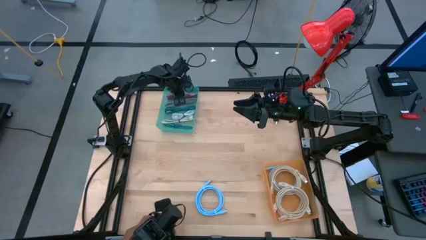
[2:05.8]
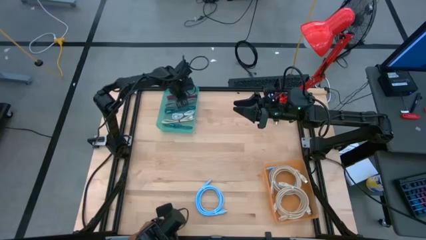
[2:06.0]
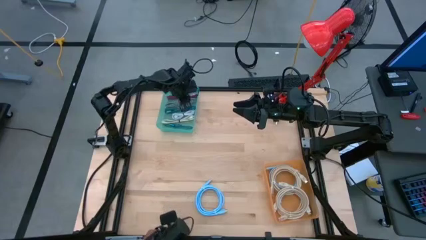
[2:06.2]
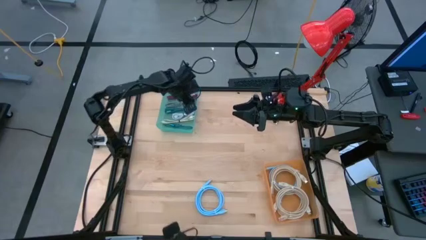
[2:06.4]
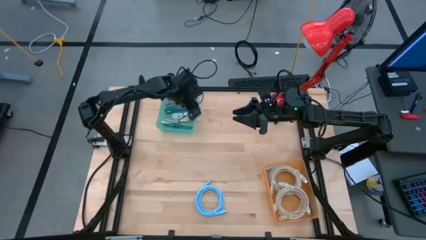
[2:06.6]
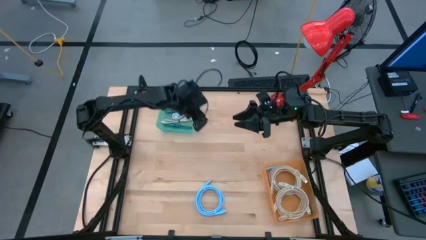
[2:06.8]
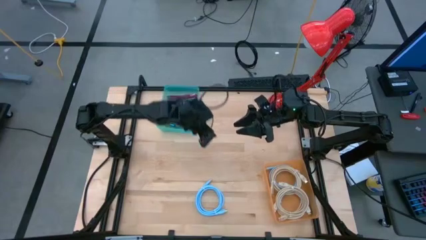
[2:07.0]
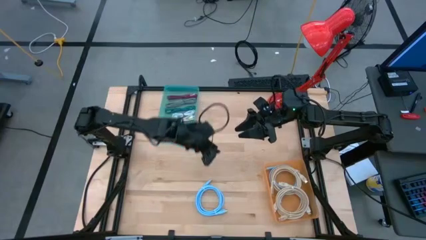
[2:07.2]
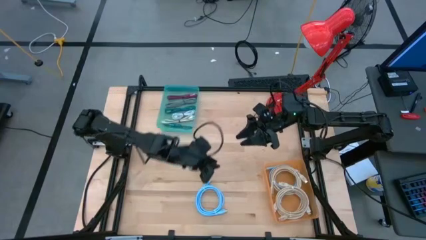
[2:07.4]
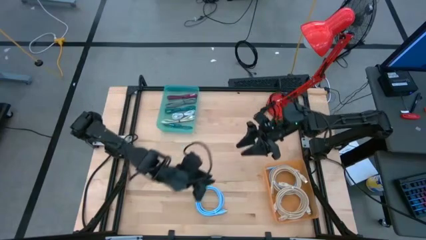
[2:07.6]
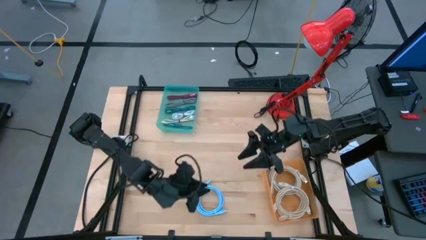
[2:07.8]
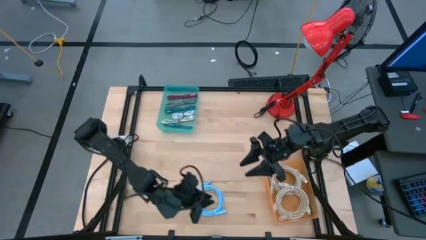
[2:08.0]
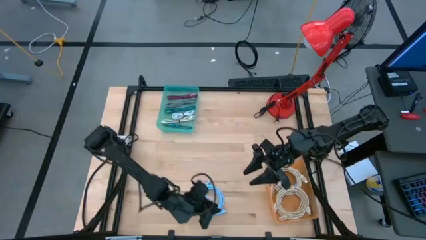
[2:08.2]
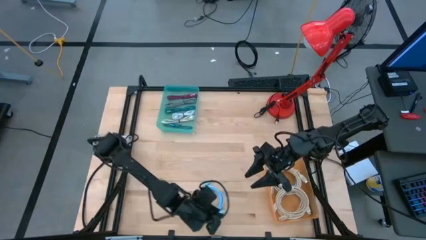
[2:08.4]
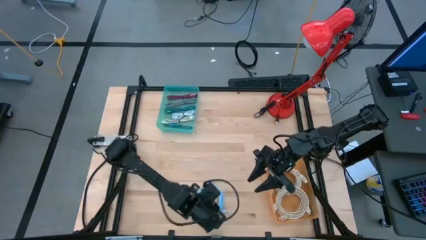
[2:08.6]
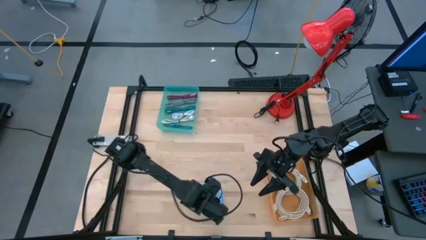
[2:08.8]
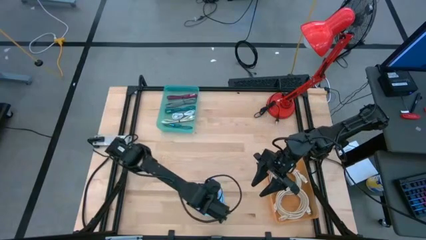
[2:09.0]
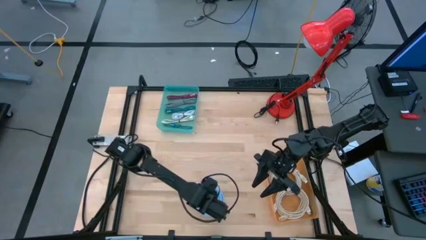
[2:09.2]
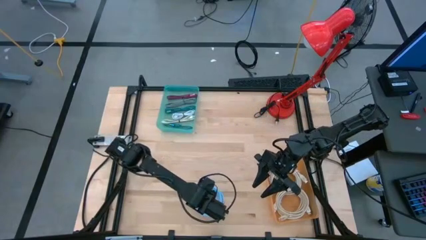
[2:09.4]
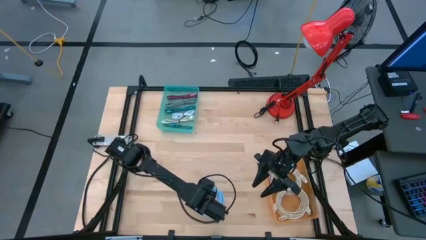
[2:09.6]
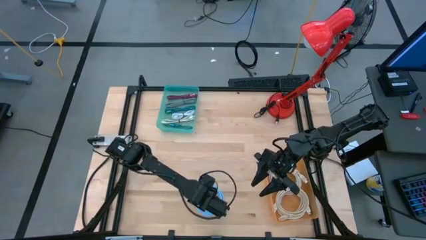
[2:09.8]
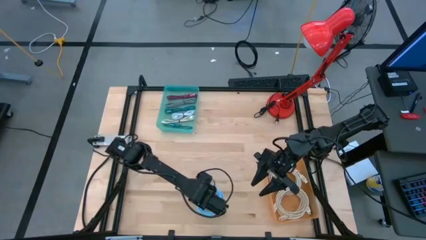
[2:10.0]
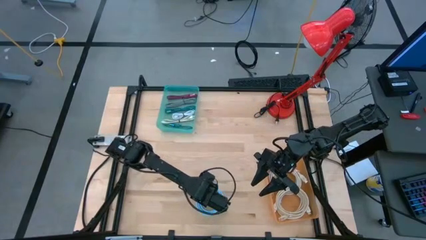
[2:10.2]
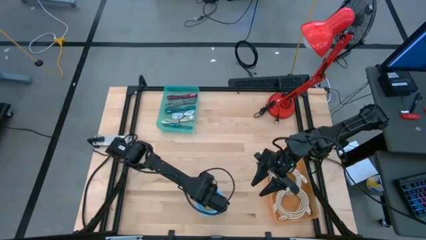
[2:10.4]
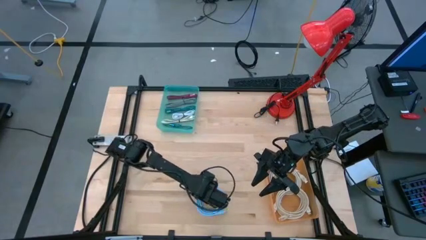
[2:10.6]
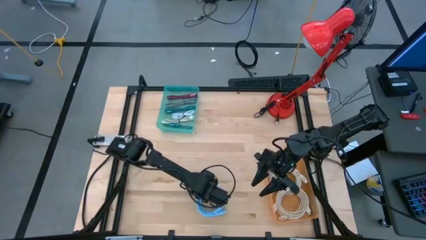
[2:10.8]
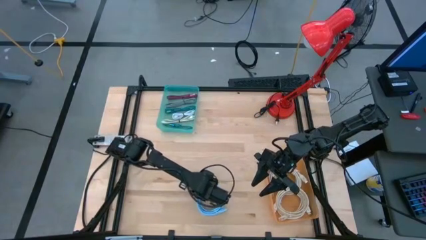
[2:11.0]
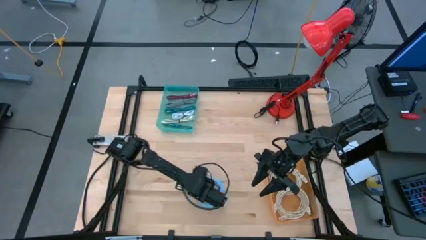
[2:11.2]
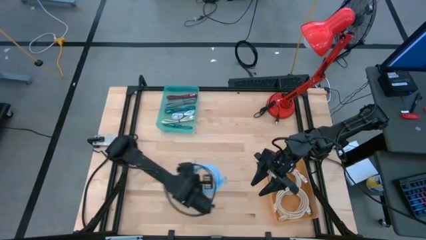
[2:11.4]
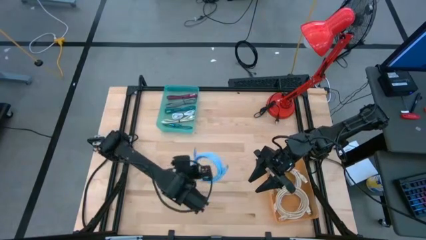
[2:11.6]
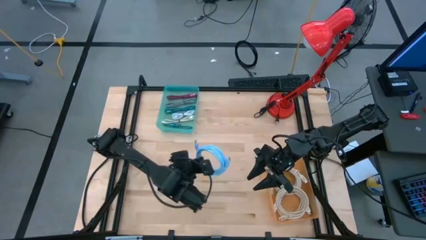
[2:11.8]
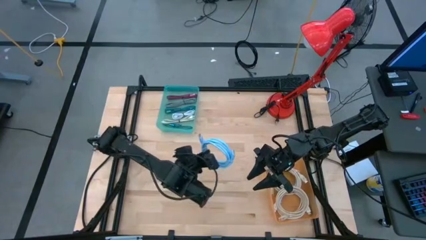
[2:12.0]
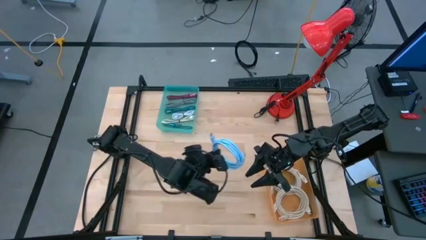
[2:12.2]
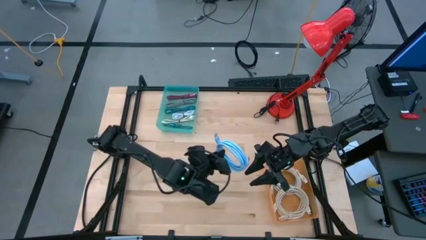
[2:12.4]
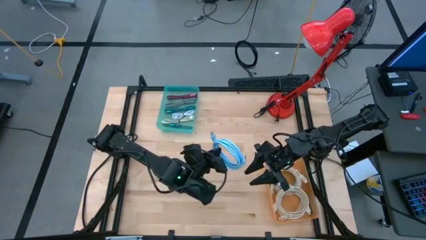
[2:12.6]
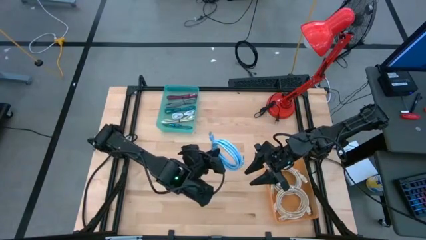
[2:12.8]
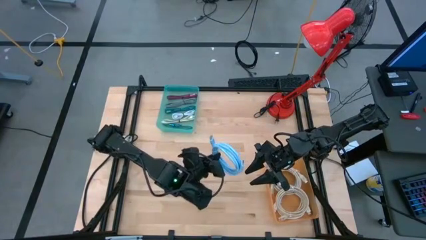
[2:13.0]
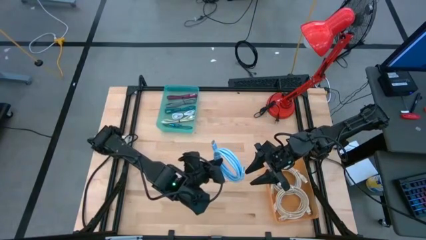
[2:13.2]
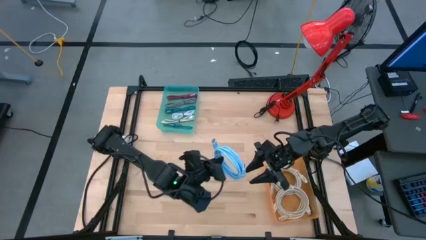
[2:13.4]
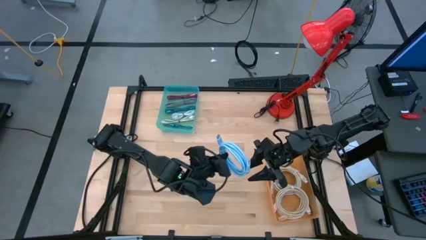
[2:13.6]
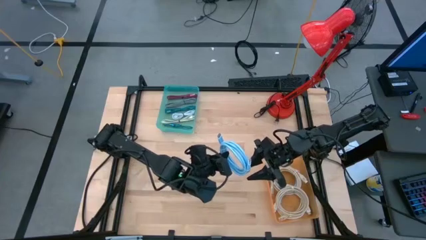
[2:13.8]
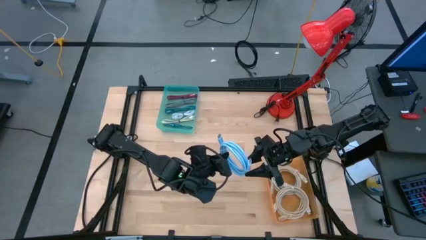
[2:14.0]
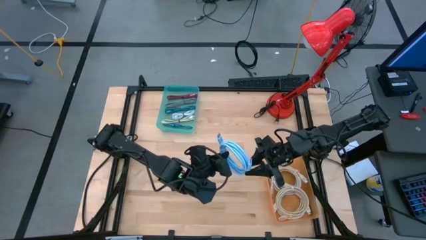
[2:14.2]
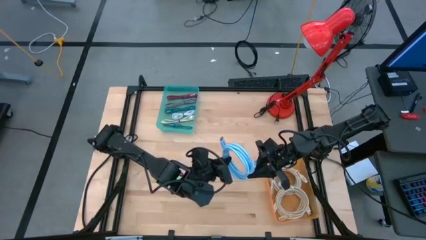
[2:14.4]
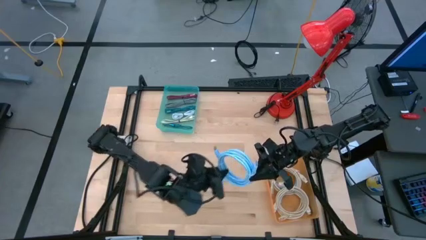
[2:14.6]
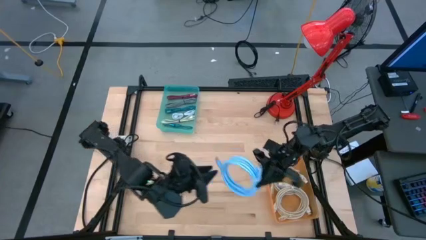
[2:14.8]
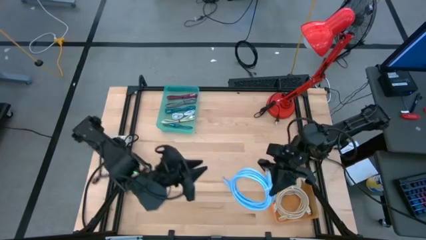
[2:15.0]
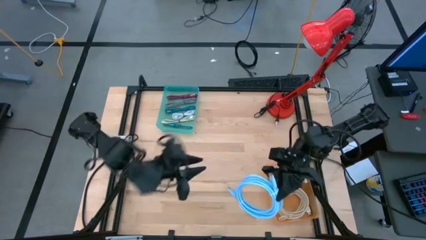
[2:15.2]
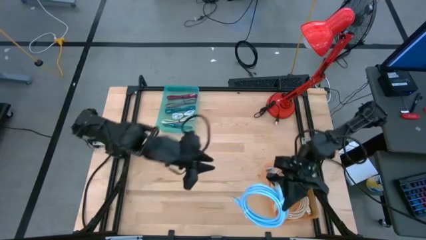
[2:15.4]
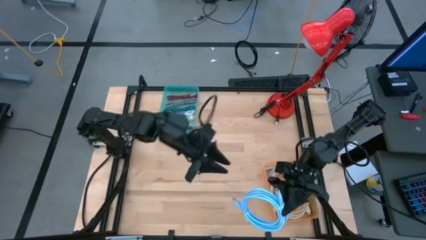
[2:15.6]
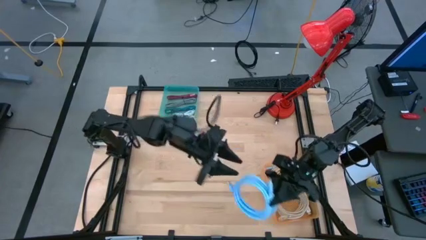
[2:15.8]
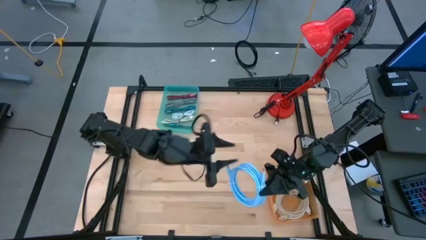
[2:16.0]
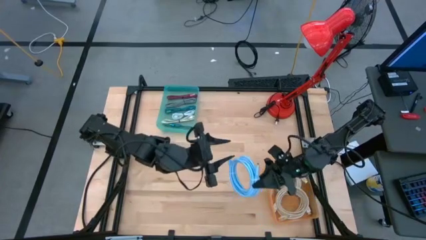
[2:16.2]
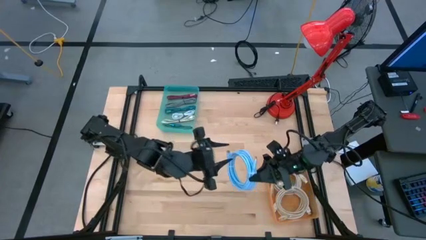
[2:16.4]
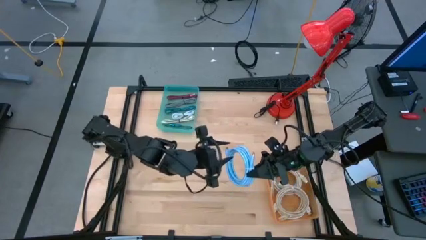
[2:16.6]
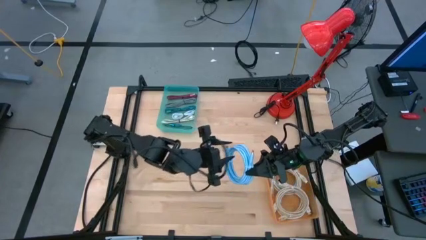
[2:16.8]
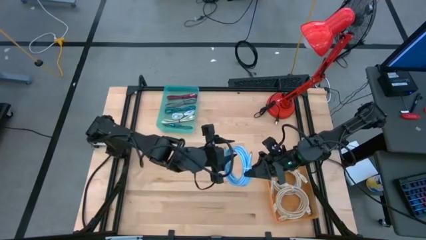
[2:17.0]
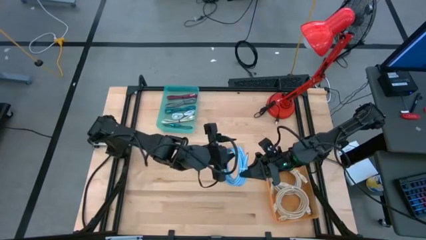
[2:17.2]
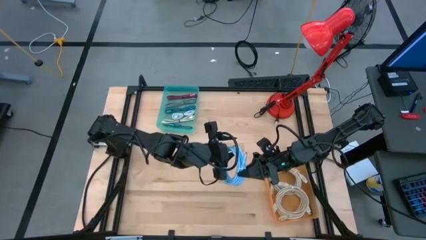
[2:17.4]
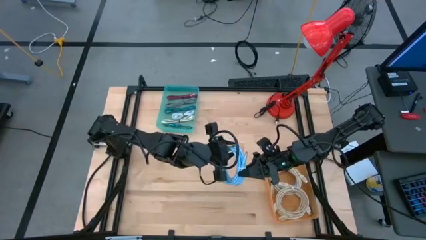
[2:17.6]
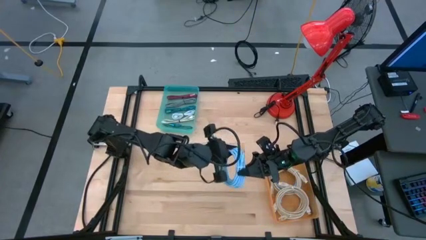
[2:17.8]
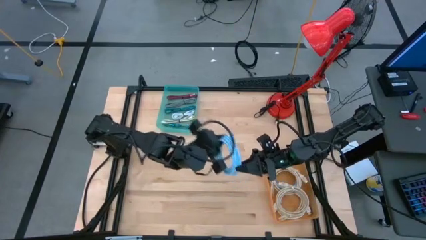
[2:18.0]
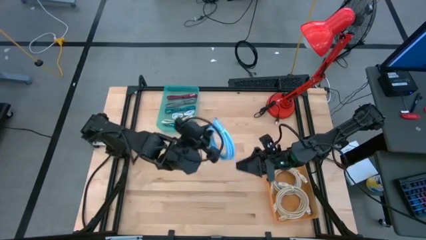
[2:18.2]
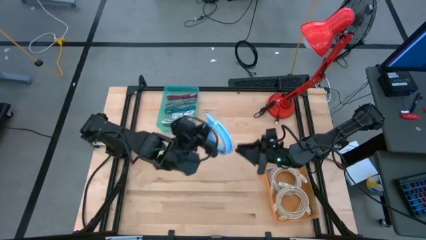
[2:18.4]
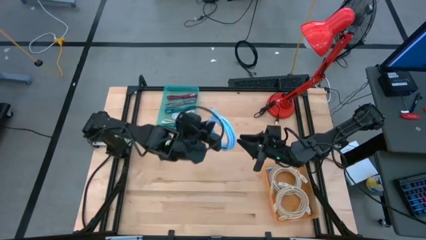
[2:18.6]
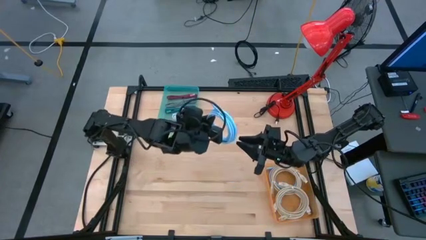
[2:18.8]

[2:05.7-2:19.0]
Task: Pick & Place USB Port
Put the blue HDMI cable into the orange bin

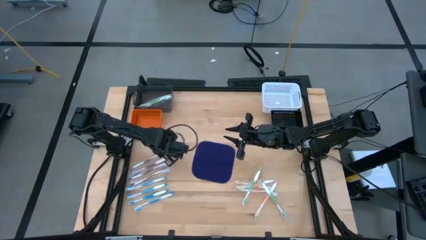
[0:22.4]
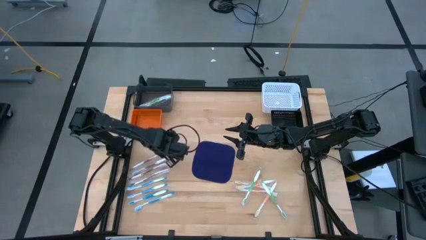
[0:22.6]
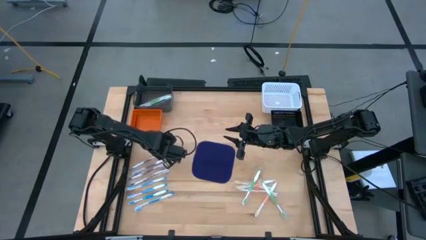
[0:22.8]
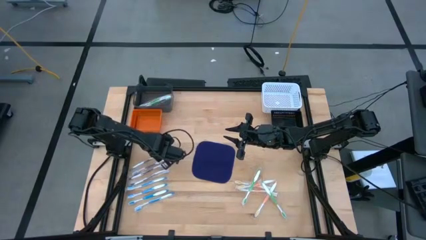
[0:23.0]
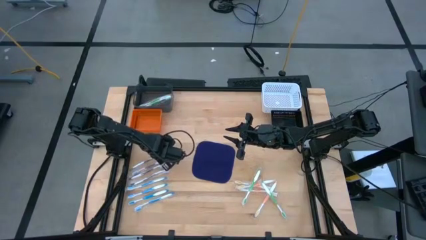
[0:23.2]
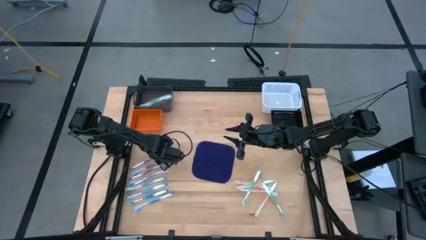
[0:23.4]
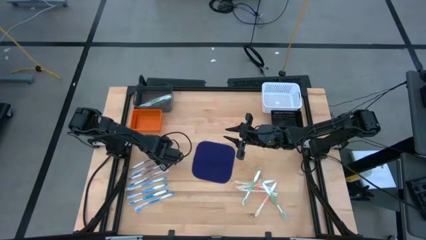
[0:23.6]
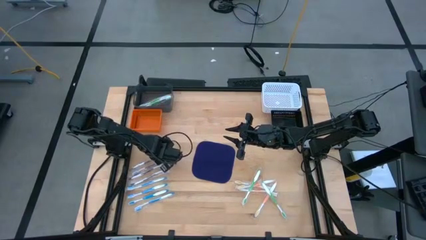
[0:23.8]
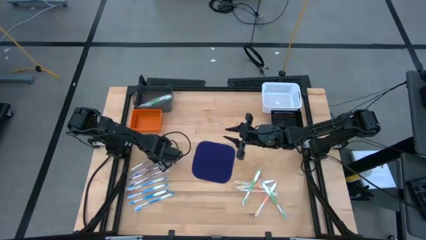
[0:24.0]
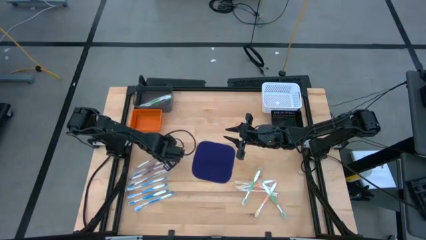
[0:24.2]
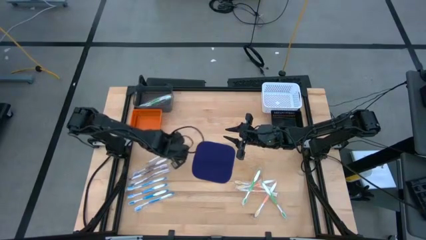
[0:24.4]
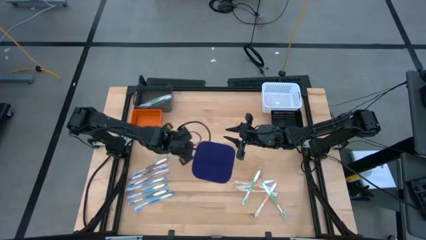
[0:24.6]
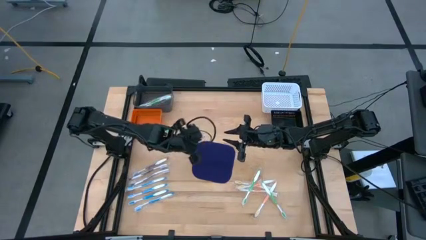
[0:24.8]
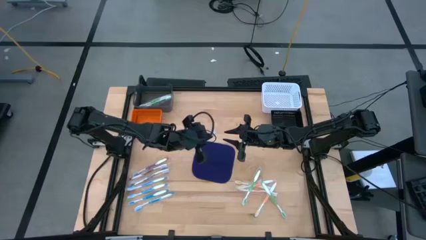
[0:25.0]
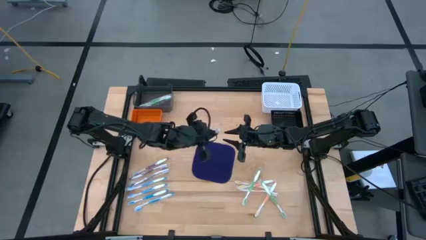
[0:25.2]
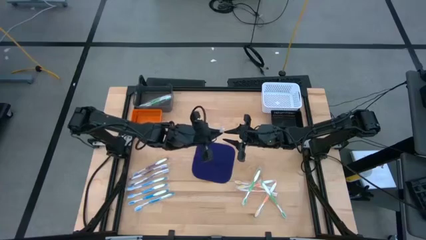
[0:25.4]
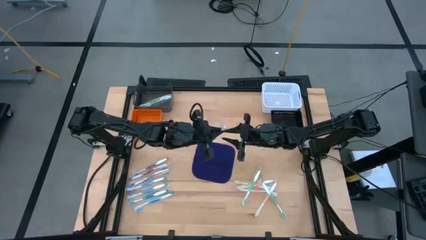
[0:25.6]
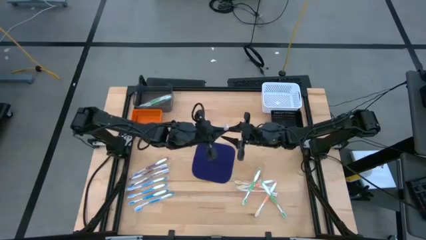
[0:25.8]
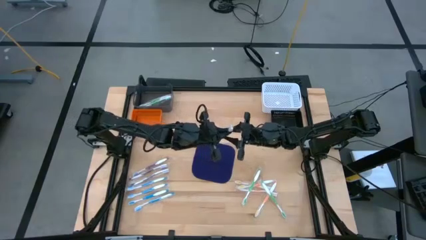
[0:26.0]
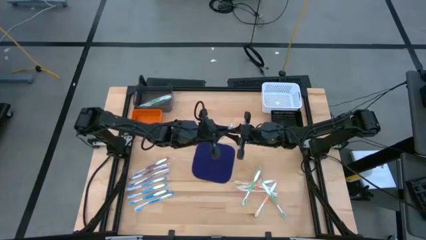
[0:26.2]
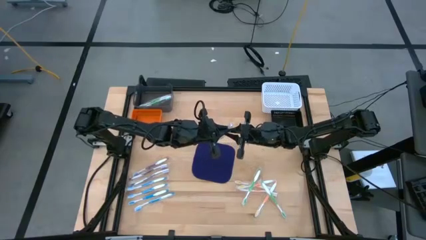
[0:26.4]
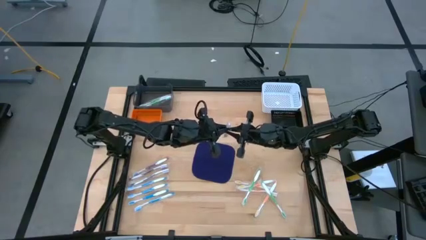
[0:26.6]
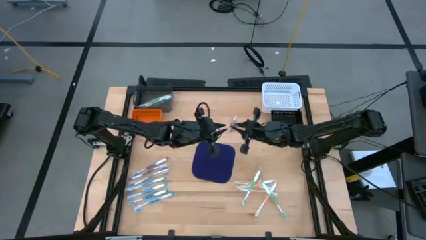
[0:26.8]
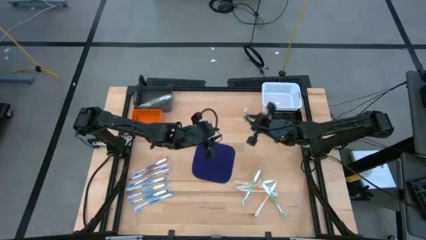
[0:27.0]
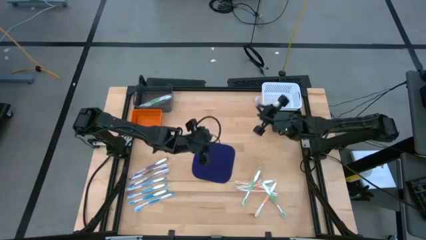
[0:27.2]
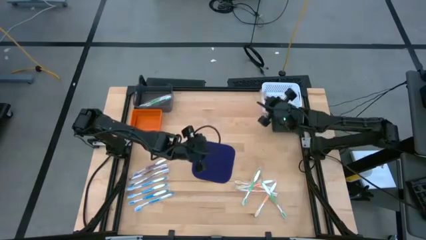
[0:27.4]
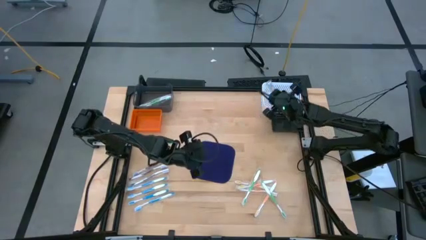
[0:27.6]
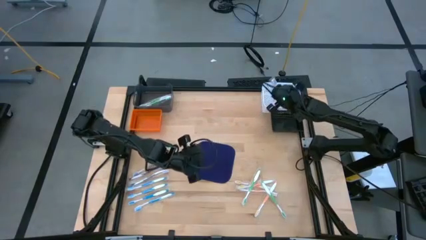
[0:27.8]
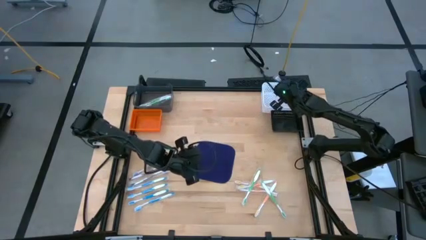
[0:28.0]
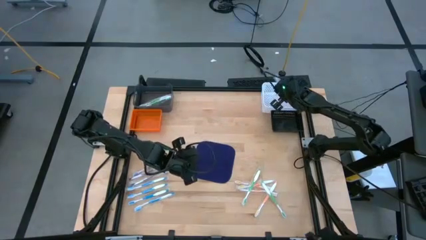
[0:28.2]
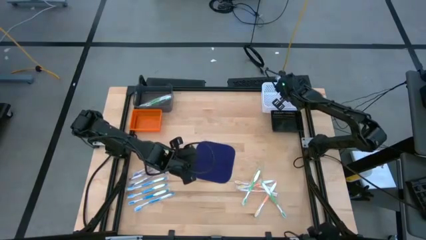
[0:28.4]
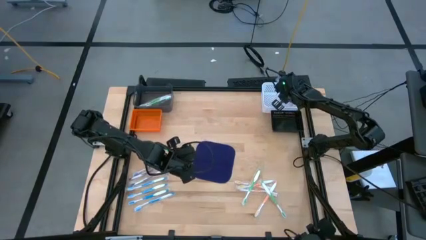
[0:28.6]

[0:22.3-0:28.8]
Task: Pick & Place Toothbrushes
Put the purple toothbrush into the white bin
